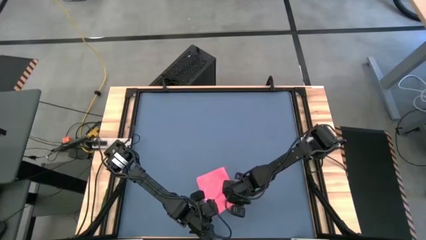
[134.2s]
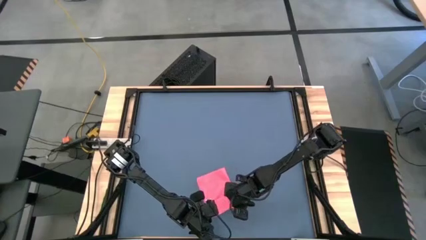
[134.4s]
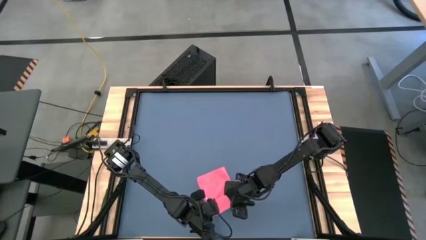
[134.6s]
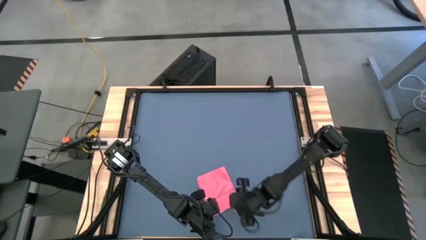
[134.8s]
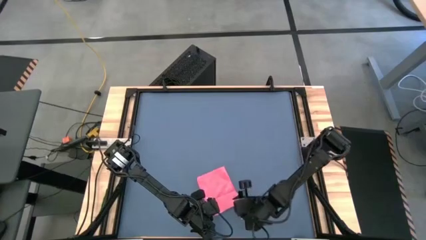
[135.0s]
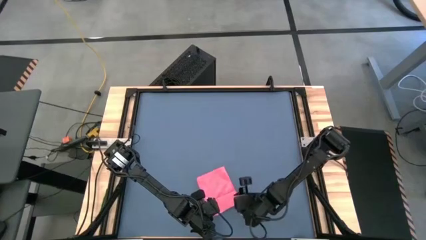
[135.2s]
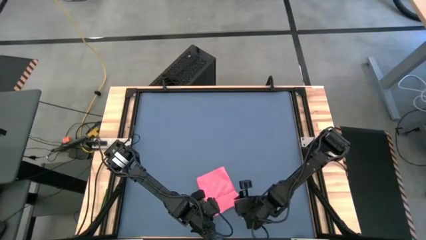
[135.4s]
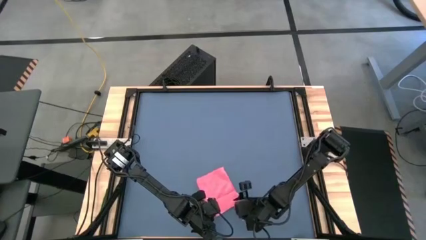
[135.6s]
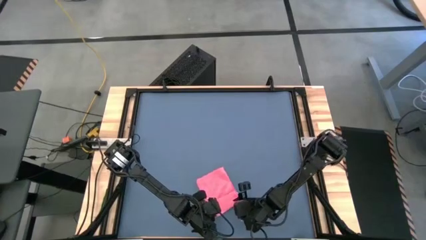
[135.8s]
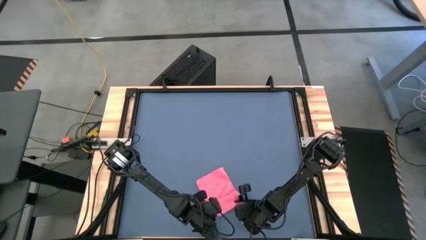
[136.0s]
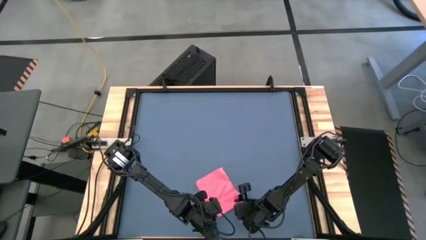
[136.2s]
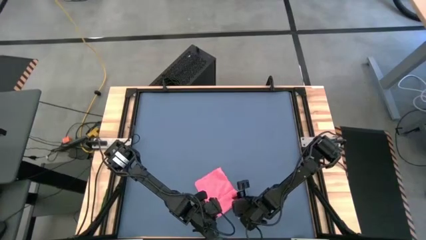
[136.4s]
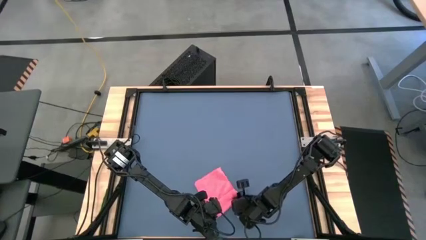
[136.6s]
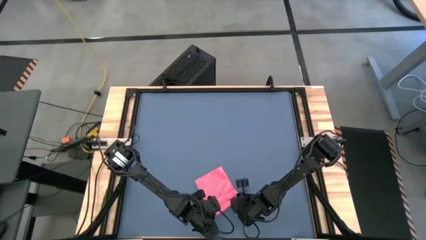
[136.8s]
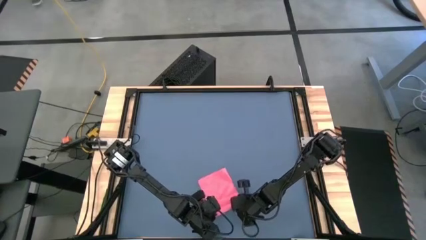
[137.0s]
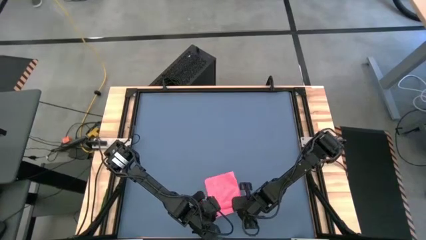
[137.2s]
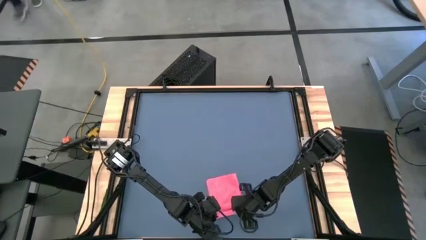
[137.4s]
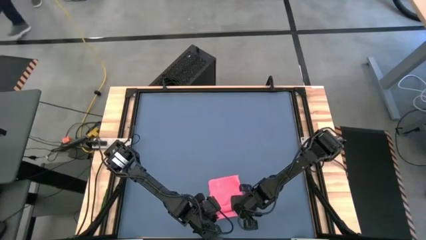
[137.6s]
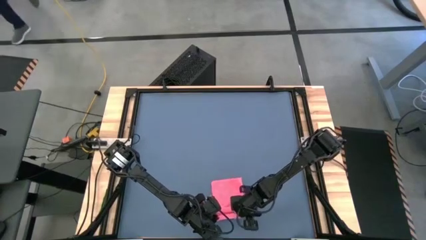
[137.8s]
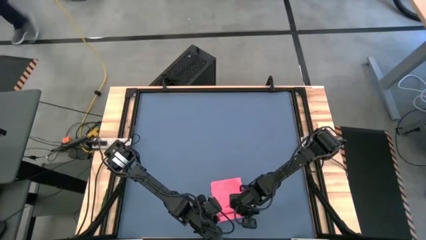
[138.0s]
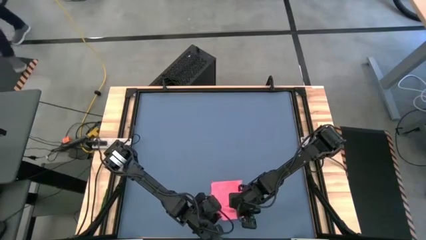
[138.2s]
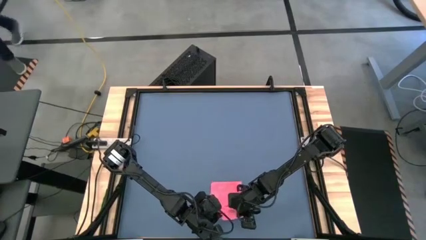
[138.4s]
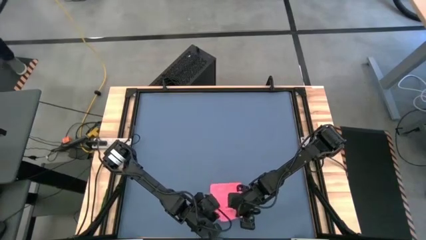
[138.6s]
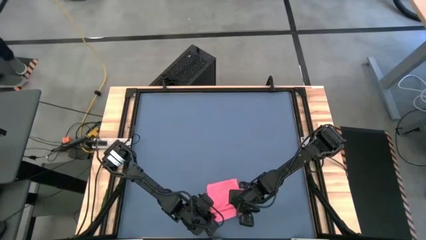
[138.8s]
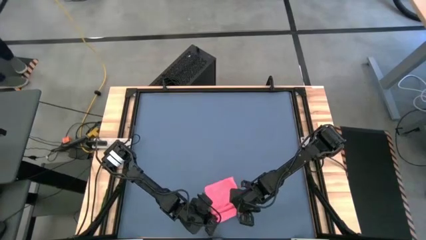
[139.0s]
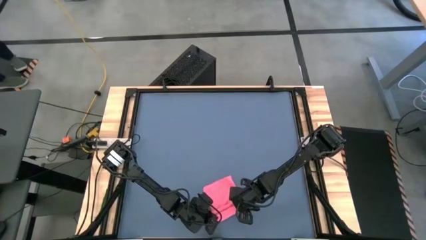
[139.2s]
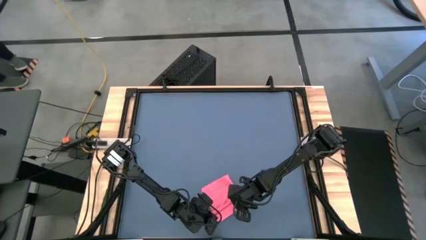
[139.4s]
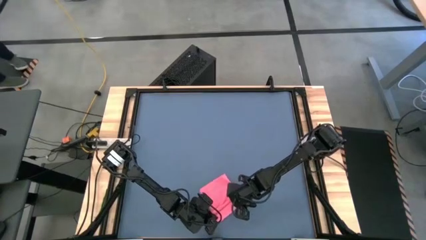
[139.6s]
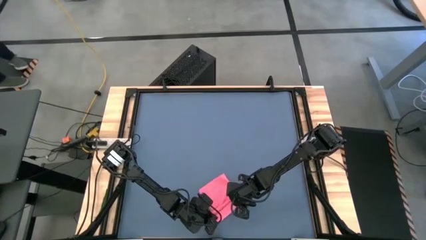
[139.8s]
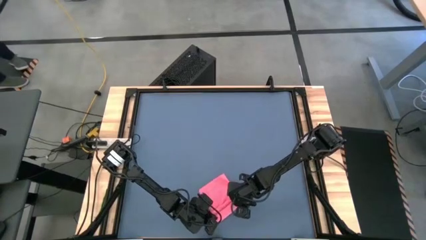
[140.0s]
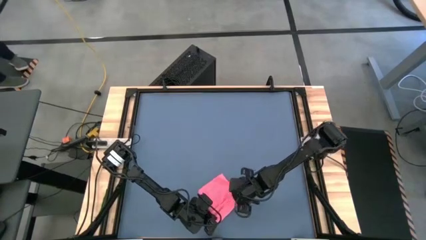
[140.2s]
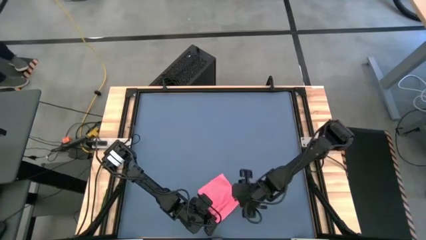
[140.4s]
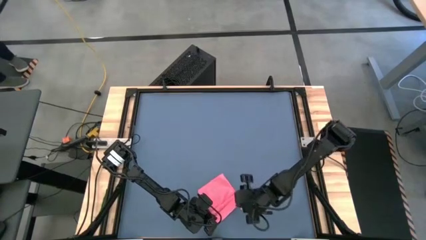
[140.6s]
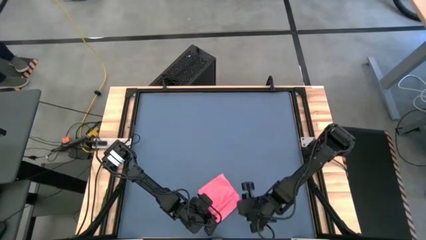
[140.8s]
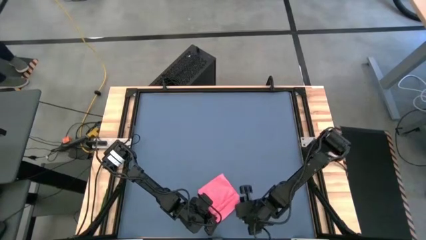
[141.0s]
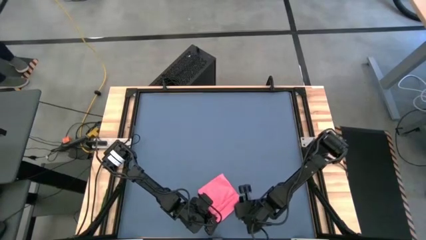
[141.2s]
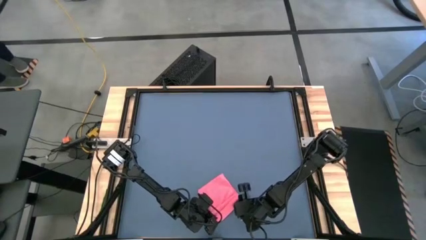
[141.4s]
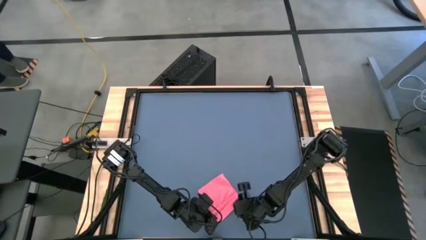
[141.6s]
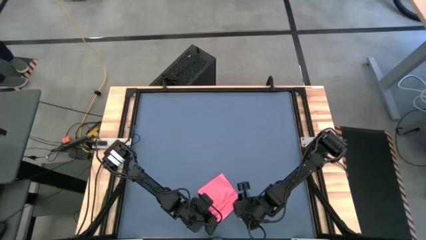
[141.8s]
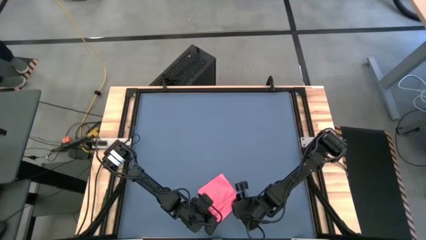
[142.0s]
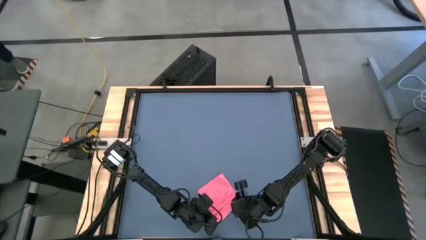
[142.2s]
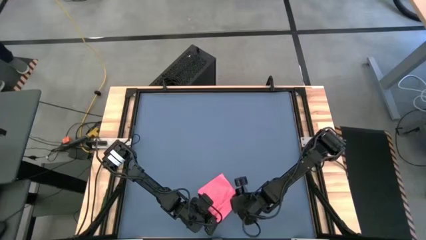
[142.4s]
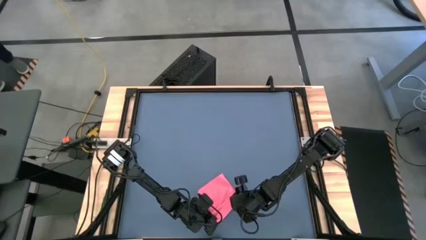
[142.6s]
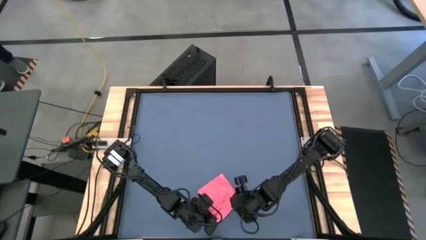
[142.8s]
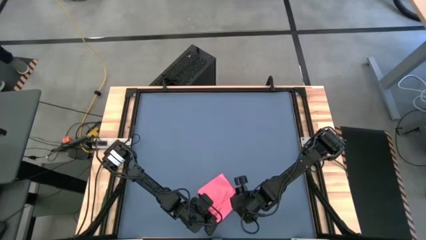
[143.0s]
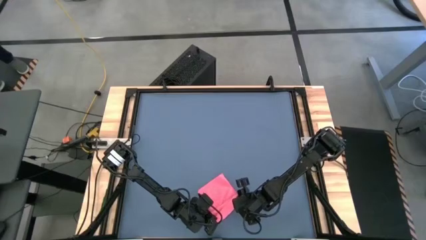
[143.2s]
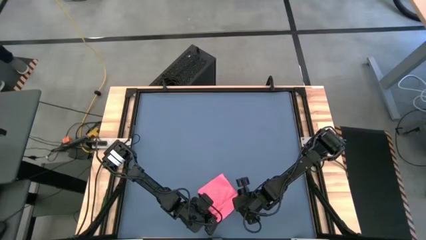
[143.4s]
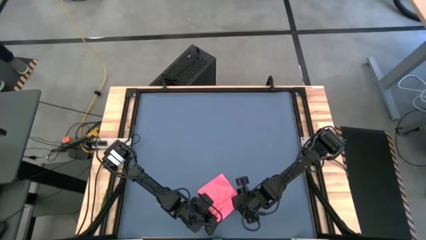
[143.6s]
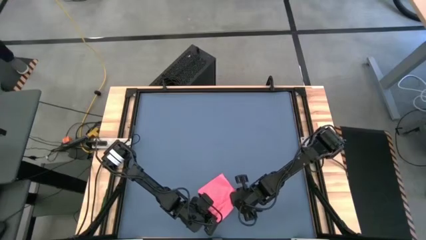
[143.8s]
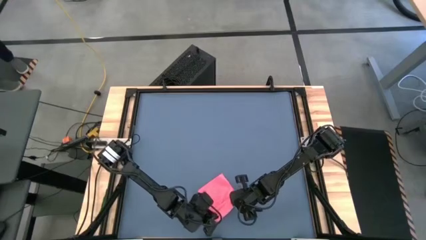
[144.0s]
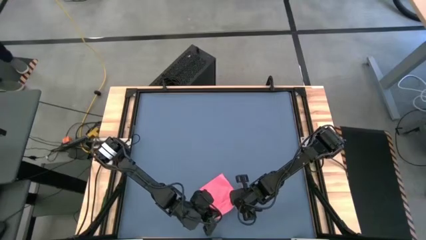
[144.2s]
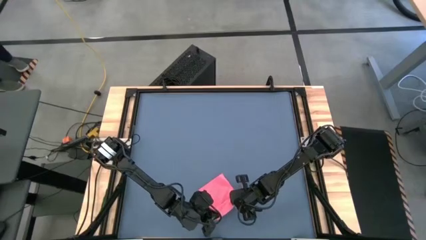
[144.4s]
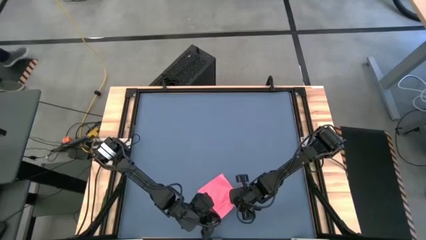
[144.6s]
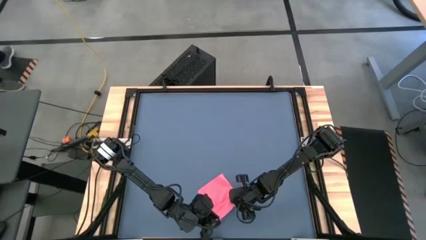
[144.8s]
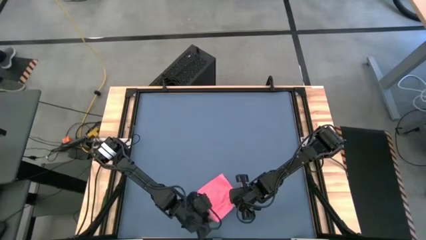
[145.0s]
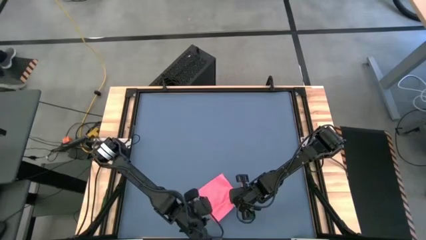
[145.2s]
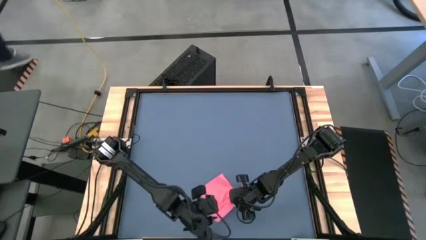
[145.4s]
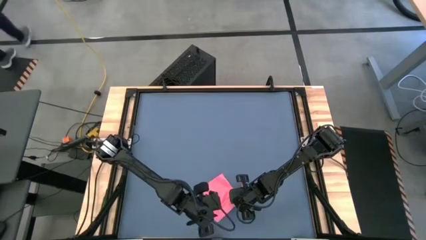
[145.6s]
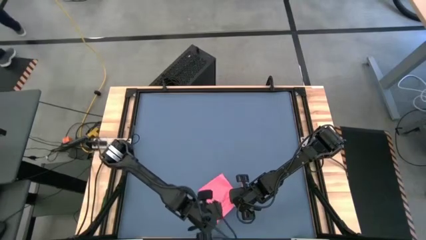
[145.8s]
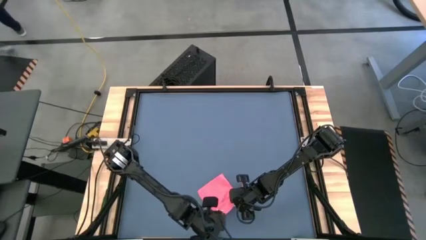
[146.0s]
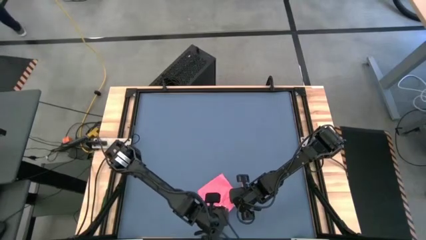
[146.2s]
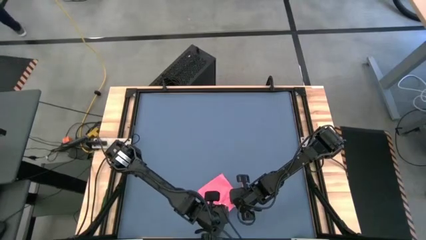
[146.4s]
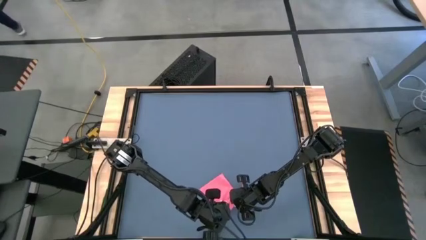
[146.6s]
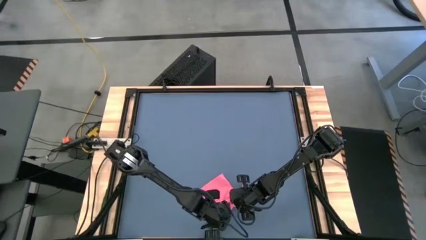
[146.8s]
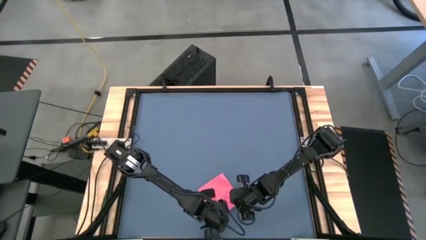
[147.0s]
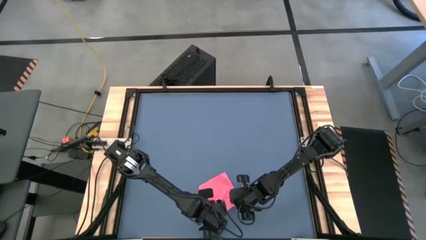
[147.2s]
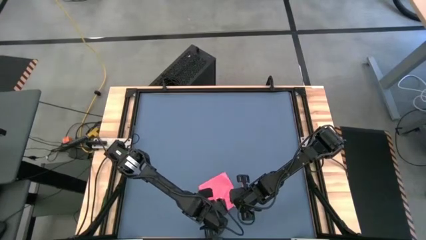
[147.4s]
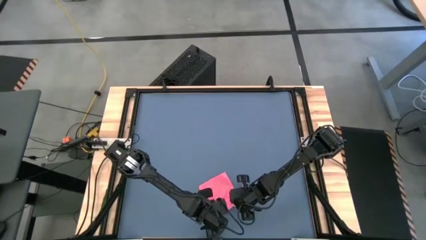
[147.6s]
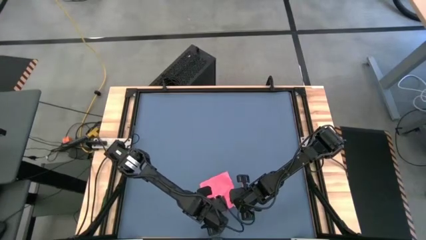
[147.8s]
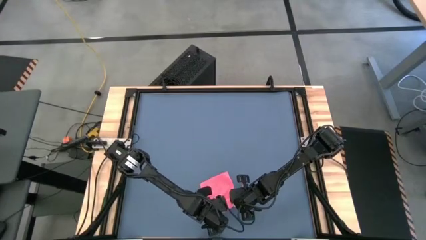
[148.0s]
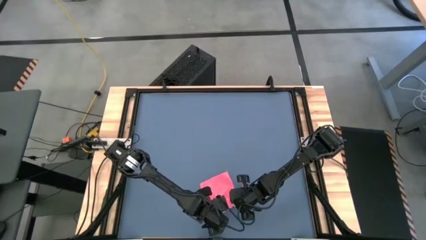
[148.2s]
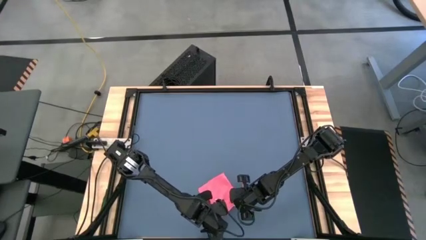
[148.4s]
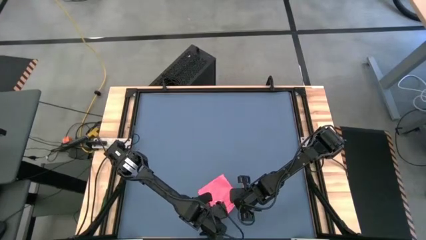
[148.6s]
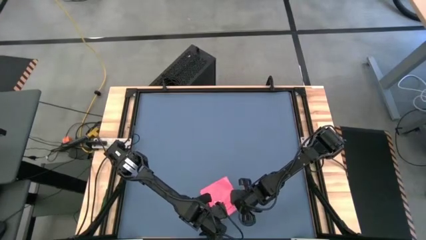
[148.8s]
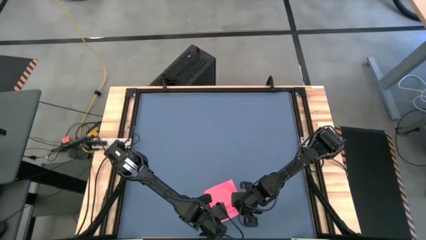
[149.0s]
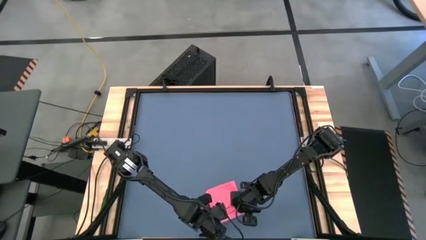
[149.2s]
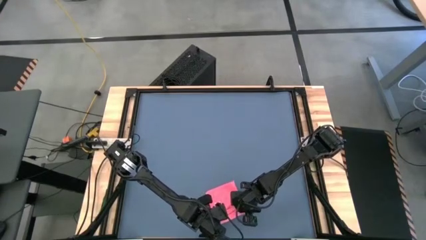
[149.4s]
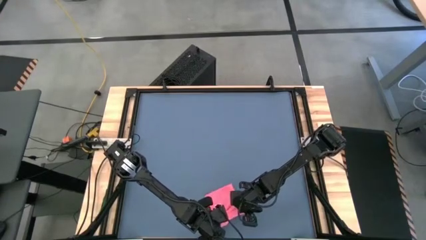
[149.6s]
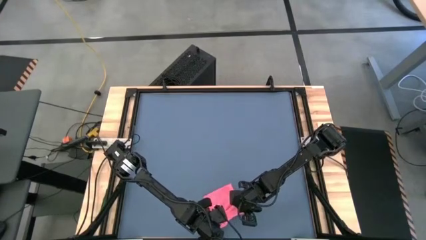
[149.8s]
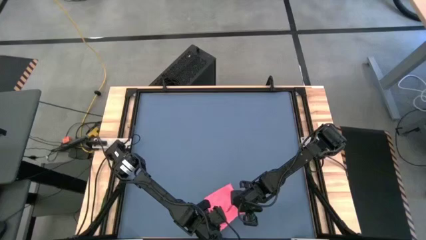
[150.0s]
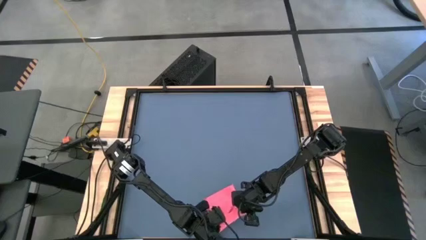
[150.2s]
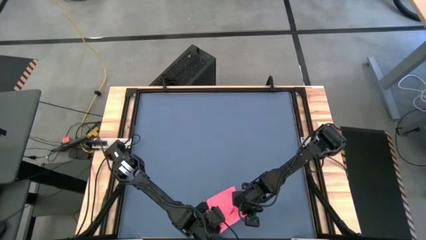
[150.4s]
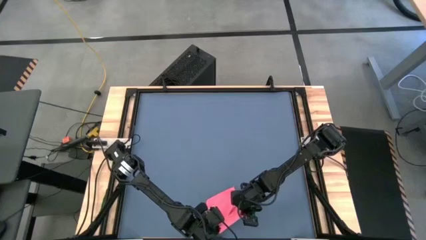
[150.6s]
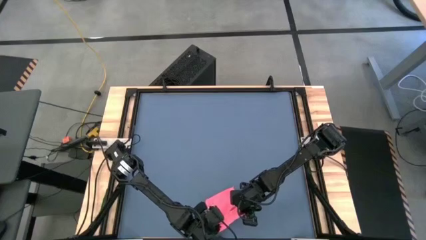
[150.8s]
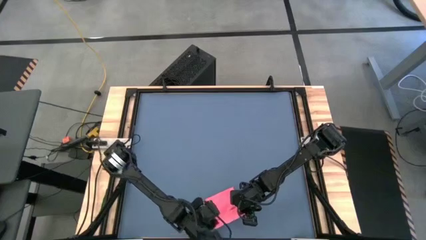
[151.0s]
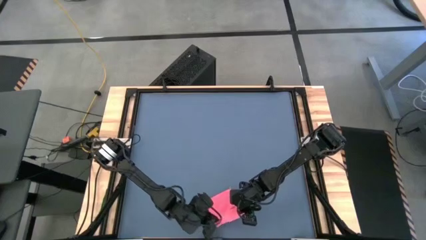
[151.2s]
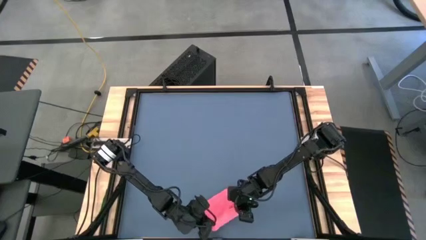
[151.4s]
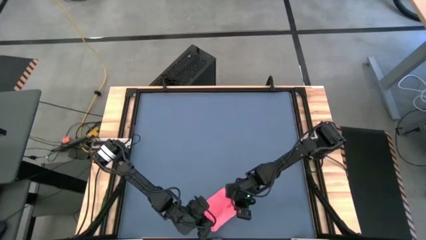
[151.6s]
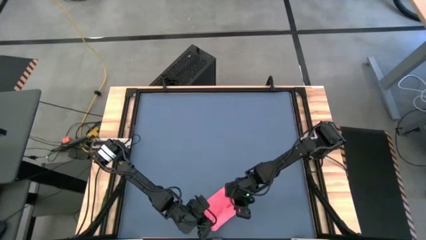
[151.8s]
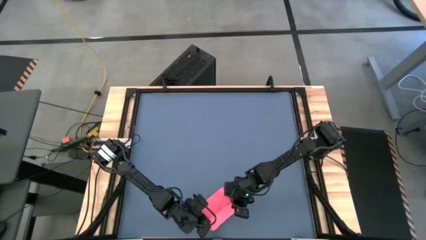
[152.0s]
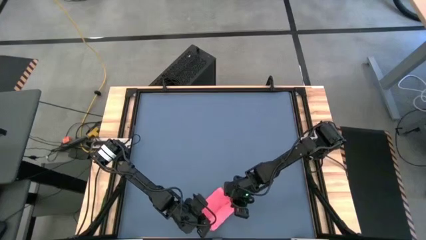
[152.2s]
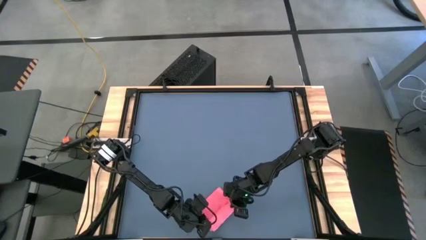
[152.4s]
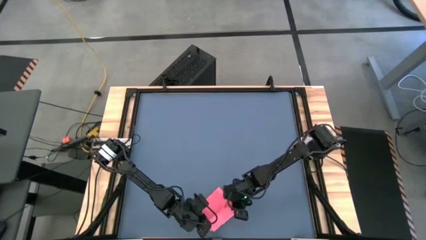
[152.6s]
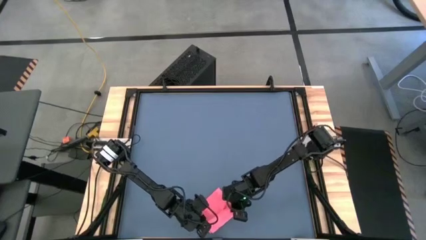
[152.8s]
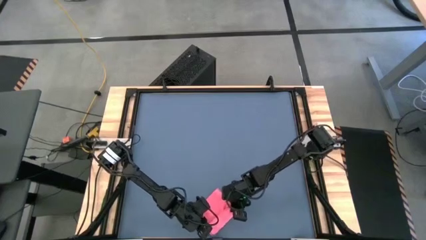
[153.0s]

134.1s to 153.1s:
Task: Roll towel
Roll the pink towel
